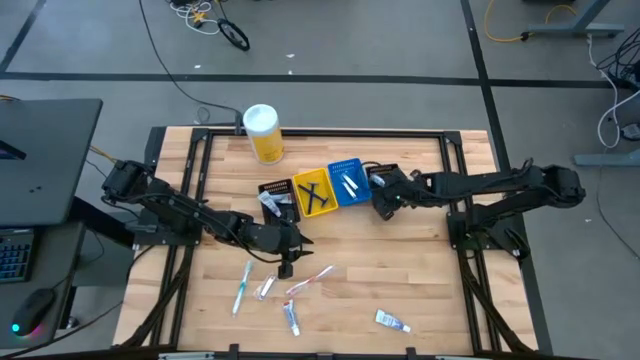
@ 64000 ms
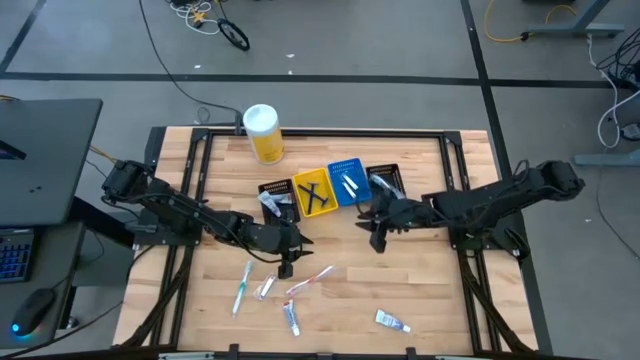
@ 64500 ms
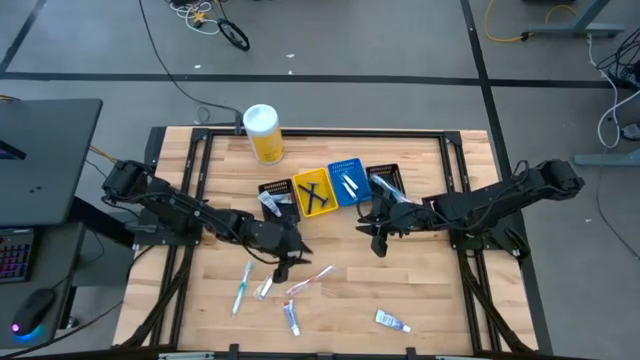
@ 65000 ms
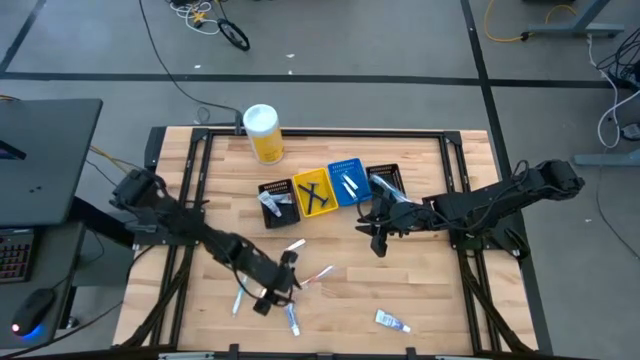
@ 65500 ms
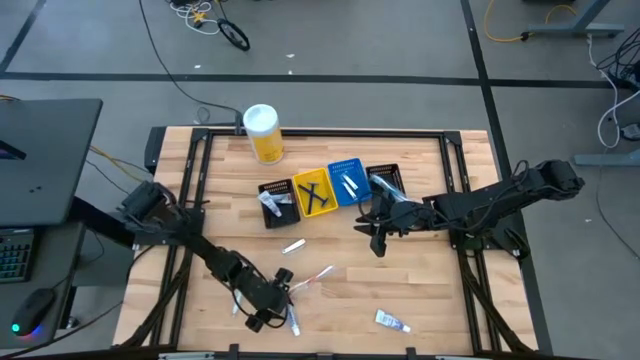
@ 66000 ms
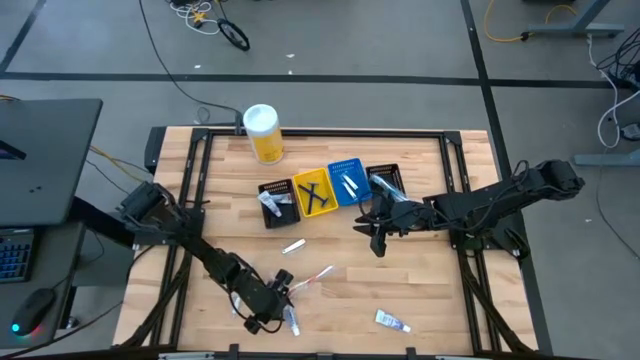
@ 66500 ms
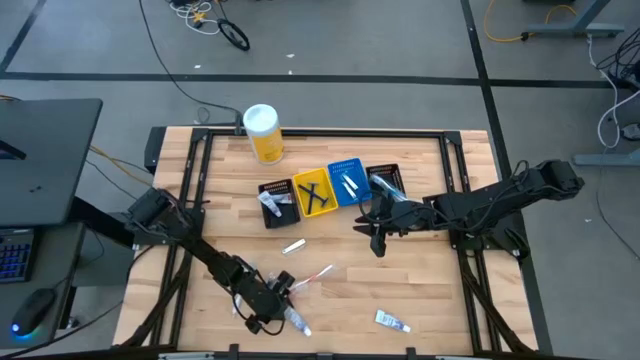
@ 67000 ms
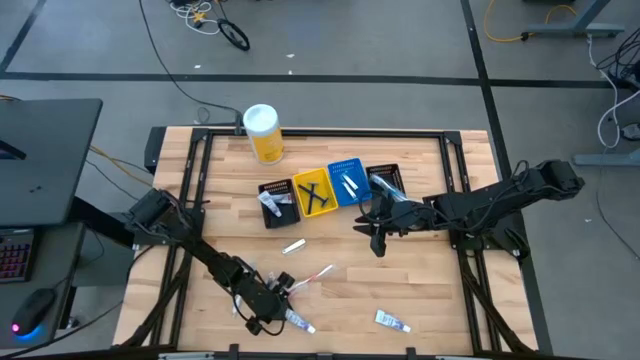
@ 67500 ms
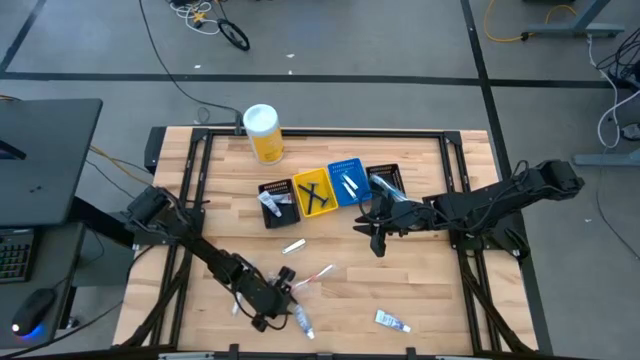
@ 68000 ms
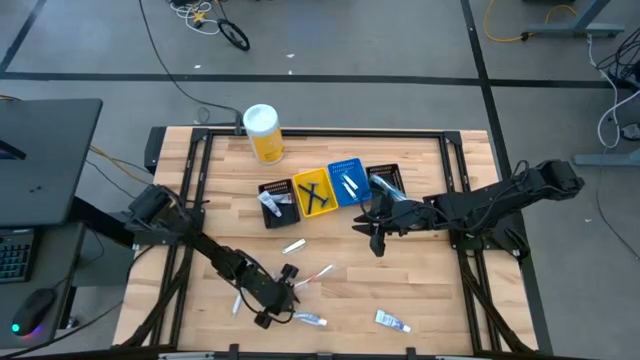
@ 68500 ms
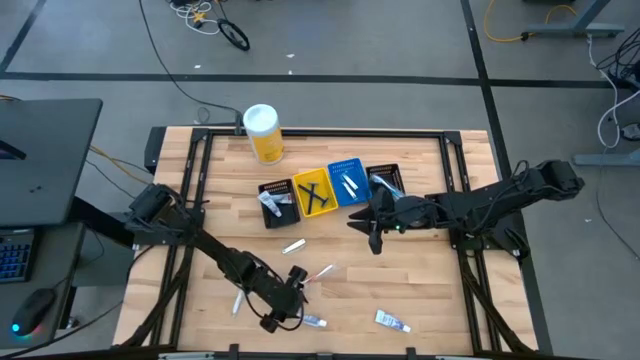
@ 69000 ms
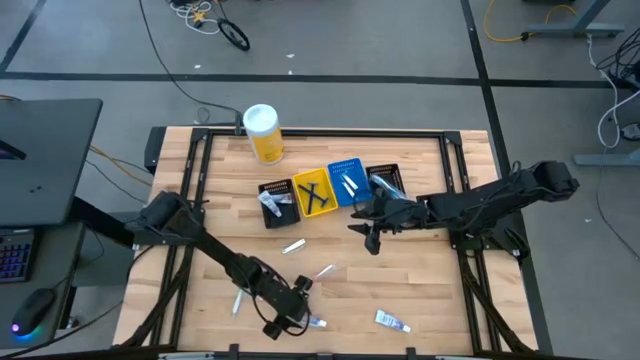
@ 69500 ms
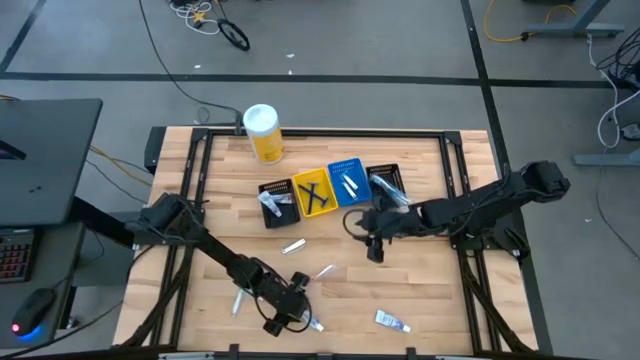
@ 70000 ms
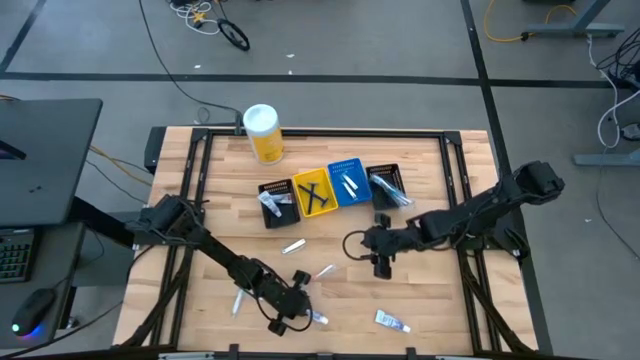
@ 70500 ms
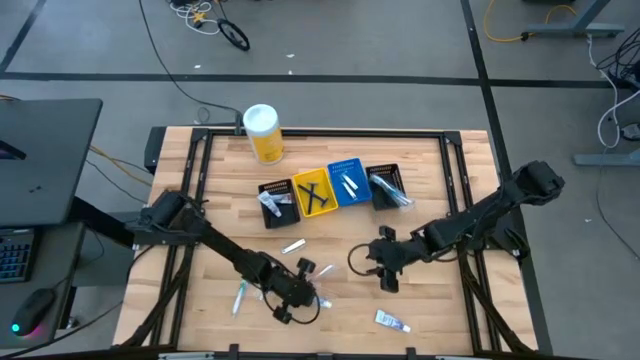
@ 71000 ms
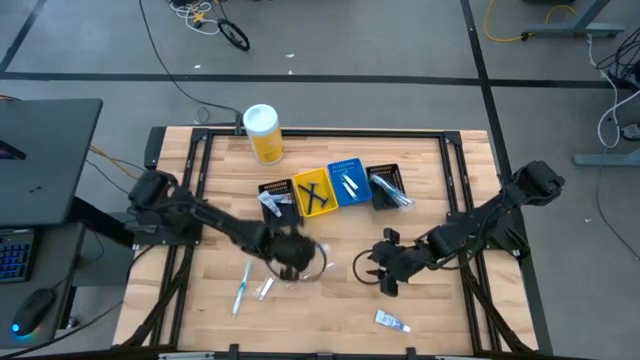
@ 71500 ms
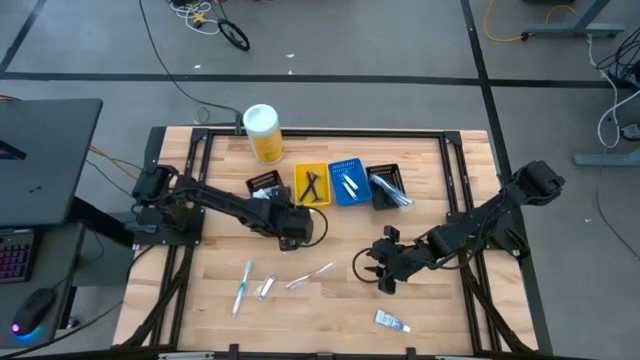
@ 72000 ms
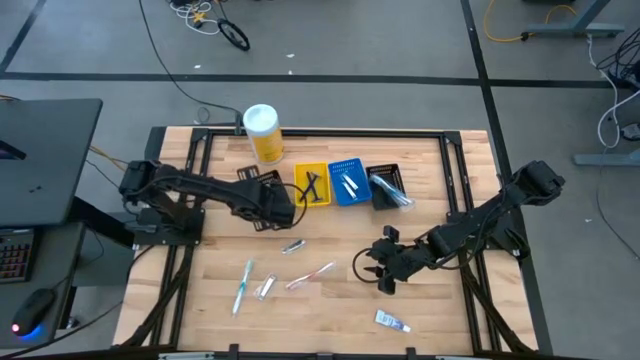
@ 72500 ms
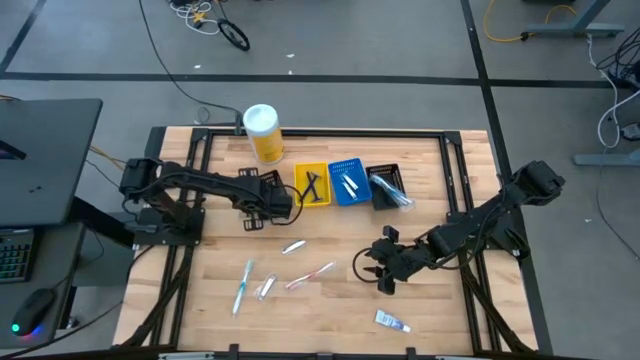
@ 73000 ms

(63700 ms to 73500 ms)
Task: Pick & Place Travel size toiletries
Put the white toothpaste into the left black basket

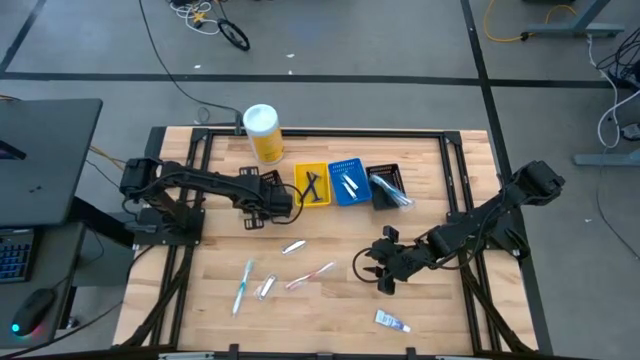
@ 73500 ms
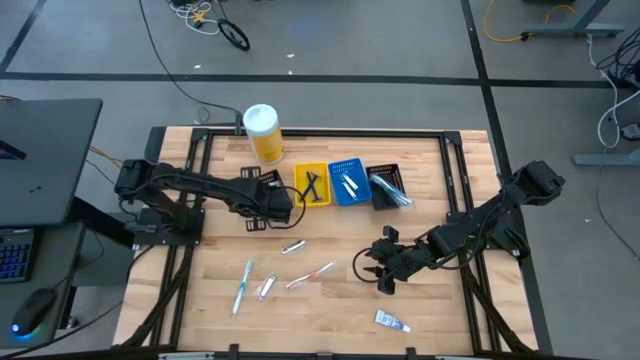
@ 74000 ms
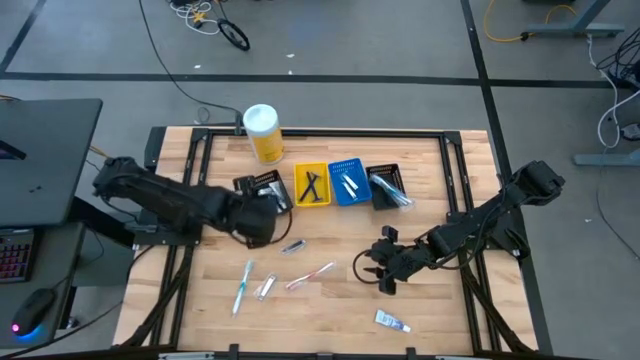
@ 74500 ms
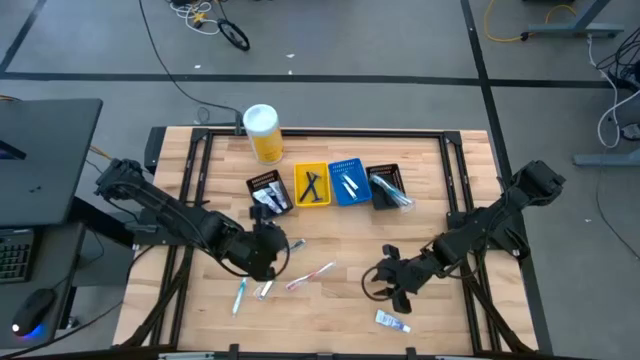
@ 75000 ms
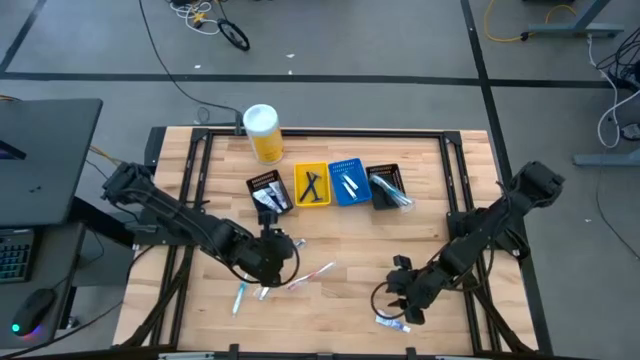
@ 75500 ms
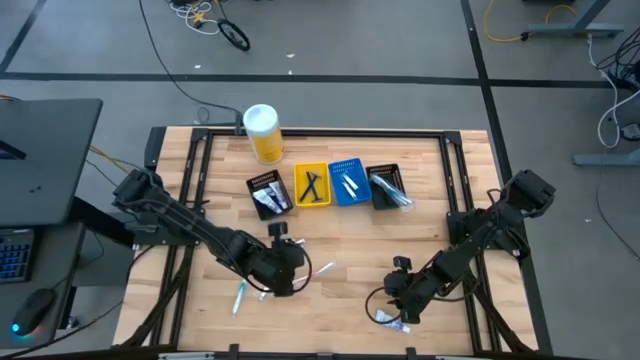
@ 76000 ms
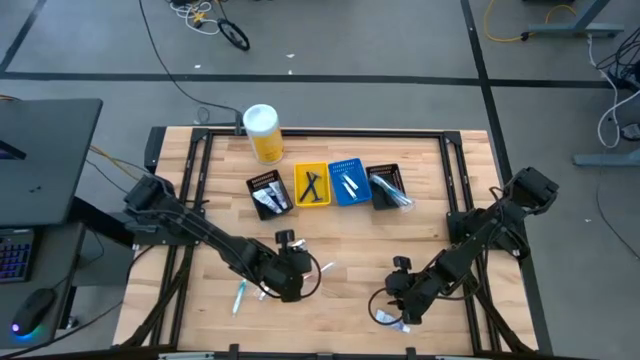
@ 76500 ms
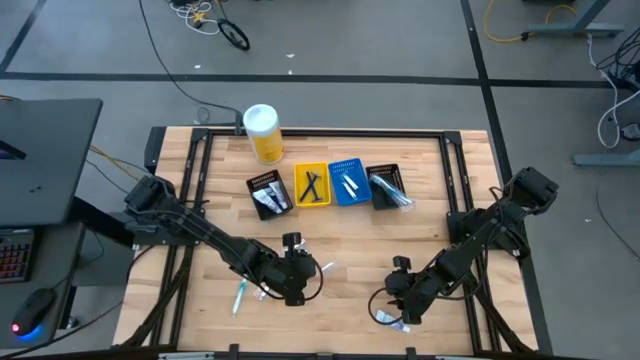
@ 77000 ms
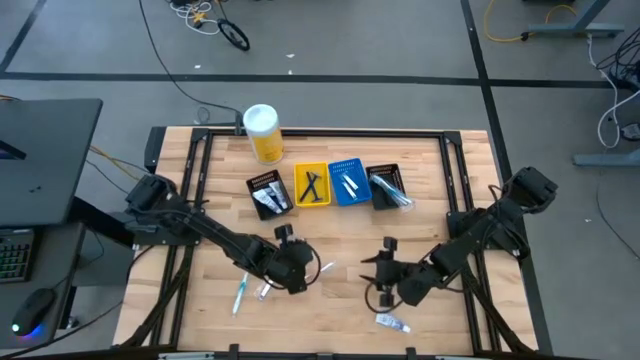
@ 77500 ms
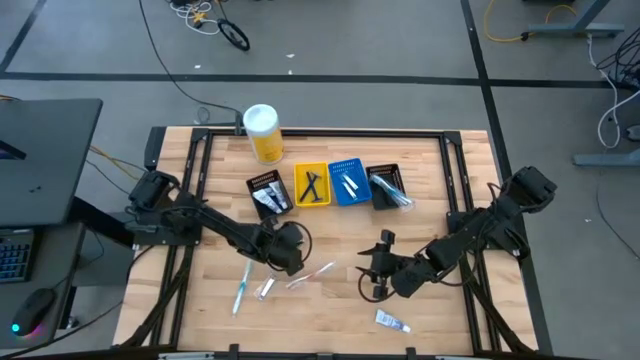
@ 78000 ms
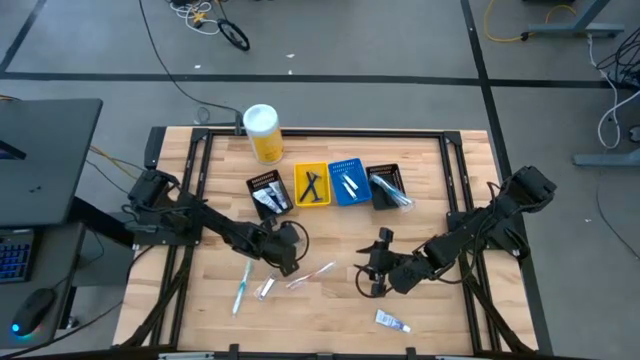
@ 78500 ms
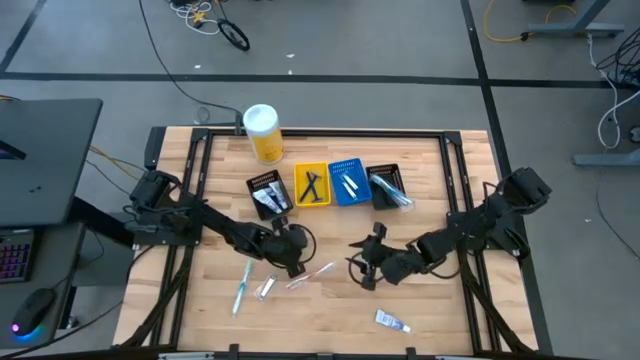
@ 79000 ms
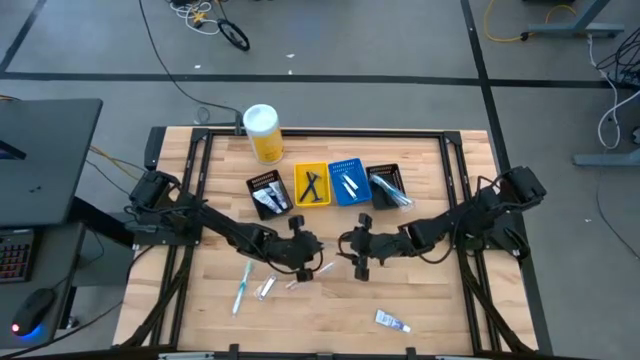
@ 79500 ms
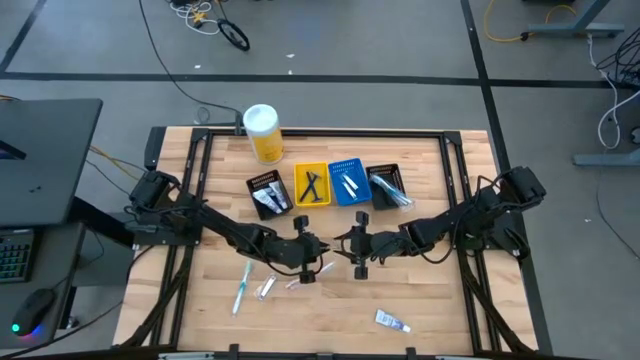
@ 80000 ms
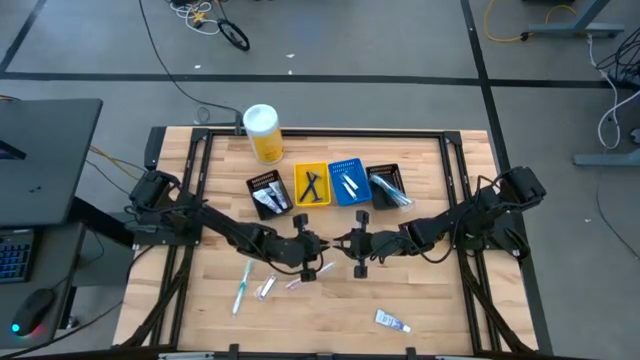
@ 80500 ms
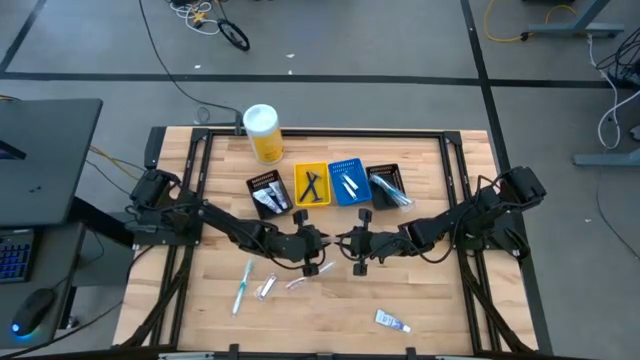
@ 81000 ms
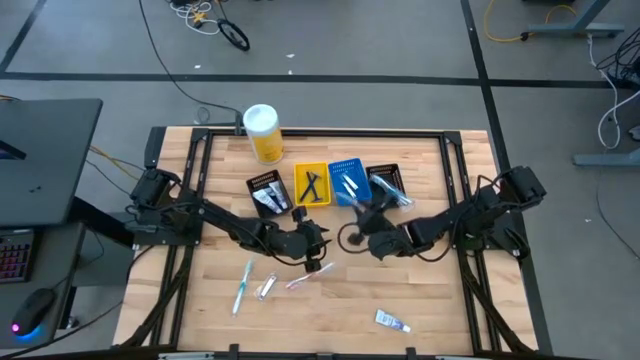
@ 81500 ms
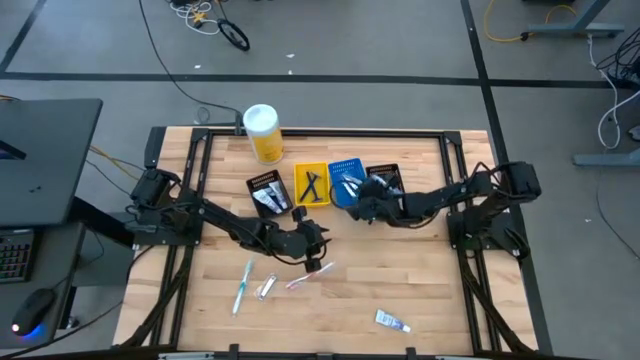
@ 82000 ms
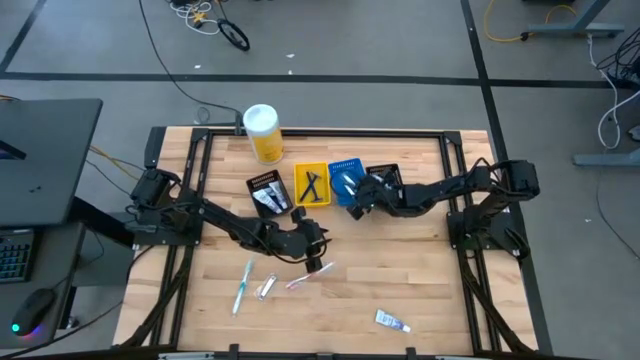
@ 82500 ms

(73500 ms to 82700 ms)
Put the silver nail cutter into the blue basket

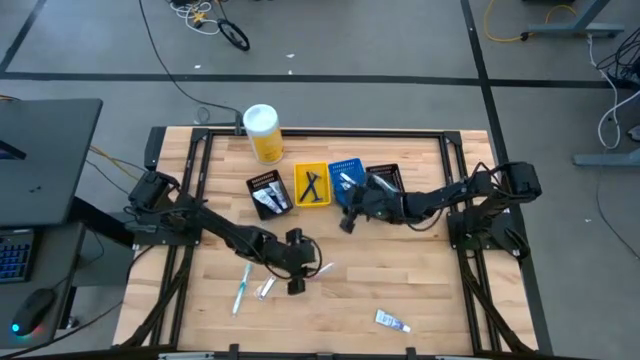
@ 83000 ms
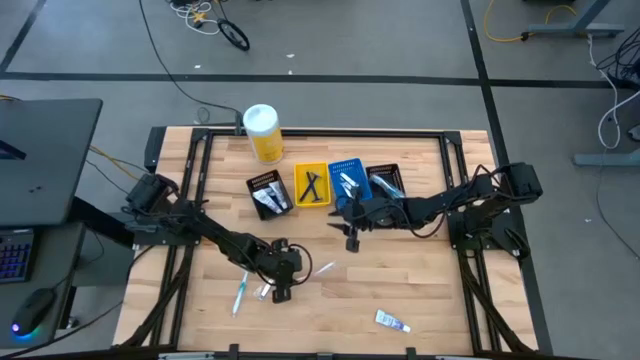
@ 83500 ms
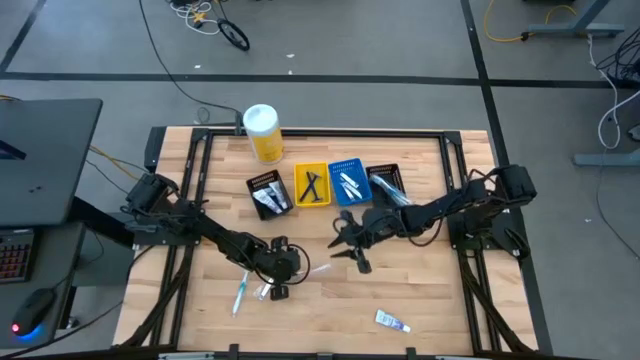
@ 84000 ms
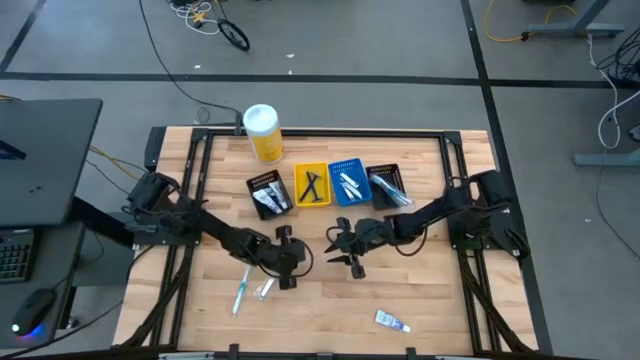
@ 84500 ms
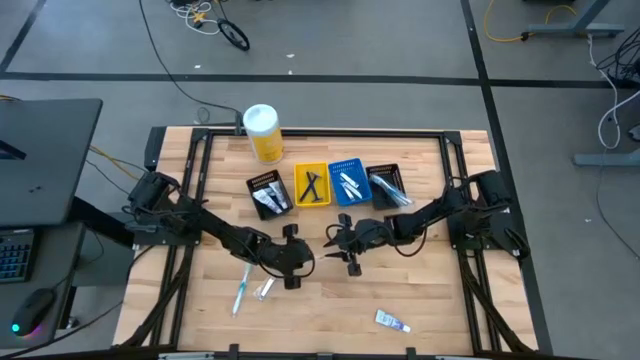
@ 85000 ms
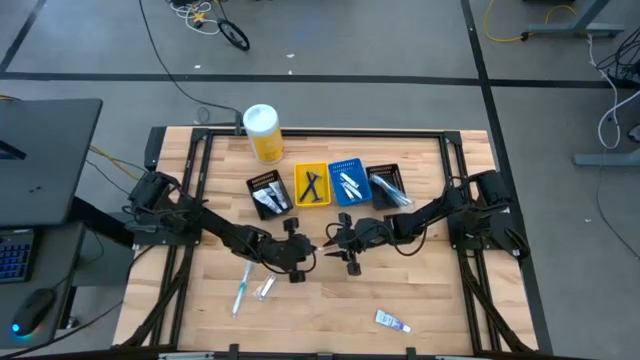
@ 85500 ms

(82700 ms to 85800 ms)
Put the orange toothbrush into the right black basket
